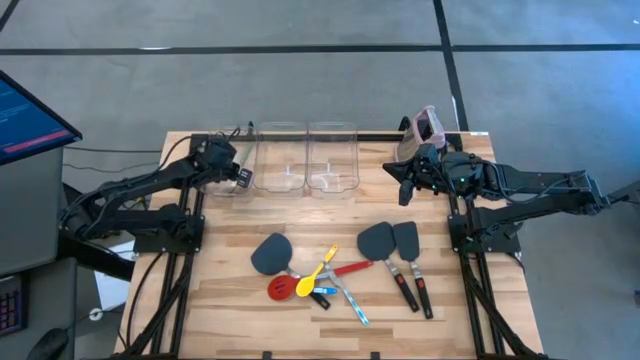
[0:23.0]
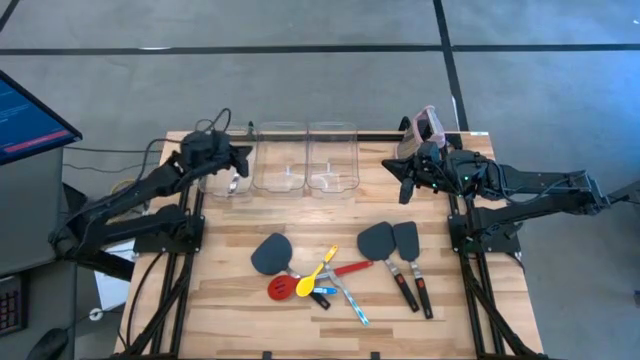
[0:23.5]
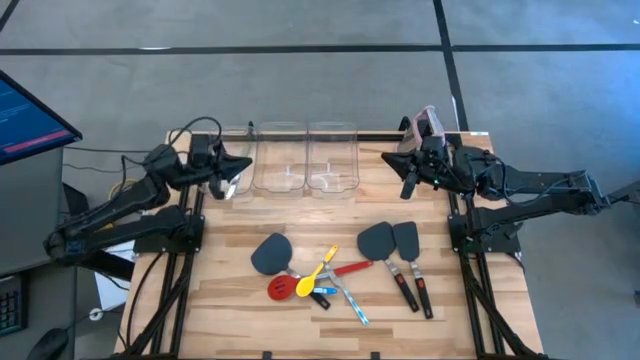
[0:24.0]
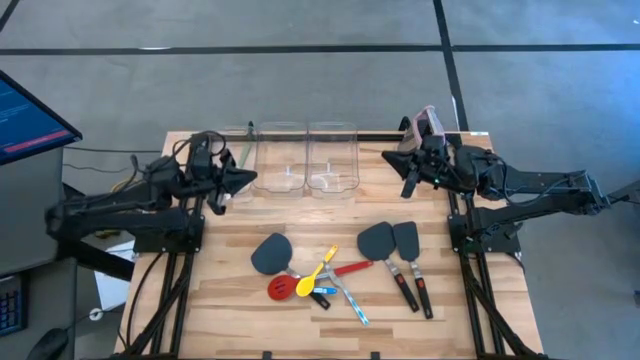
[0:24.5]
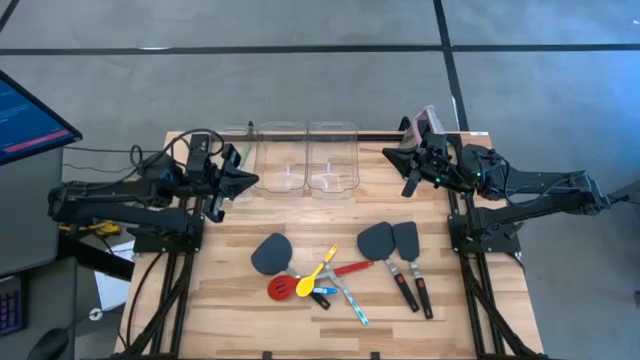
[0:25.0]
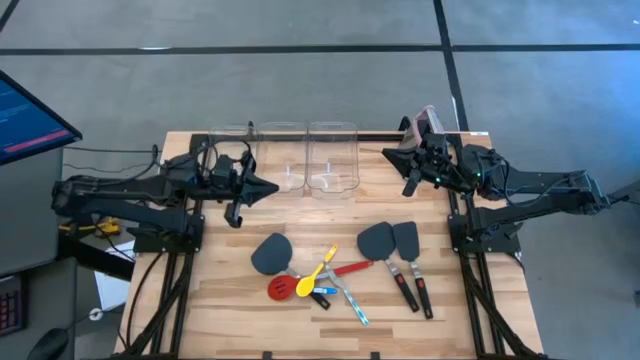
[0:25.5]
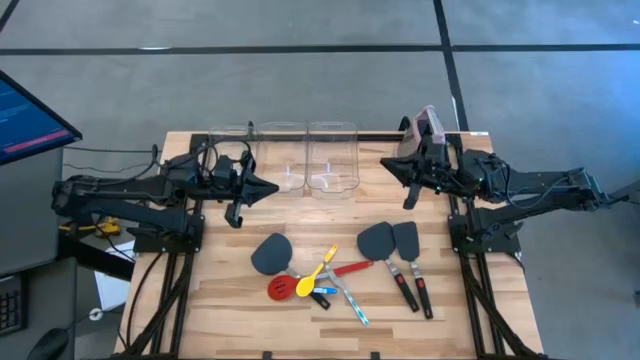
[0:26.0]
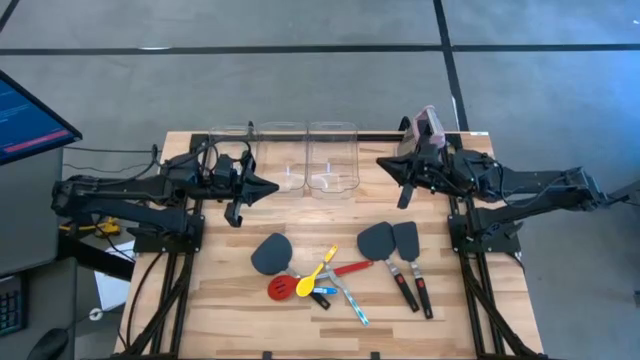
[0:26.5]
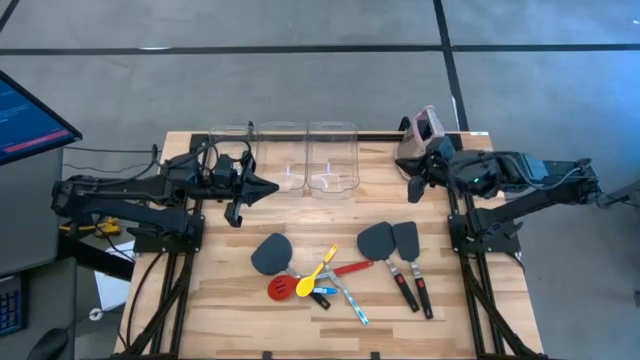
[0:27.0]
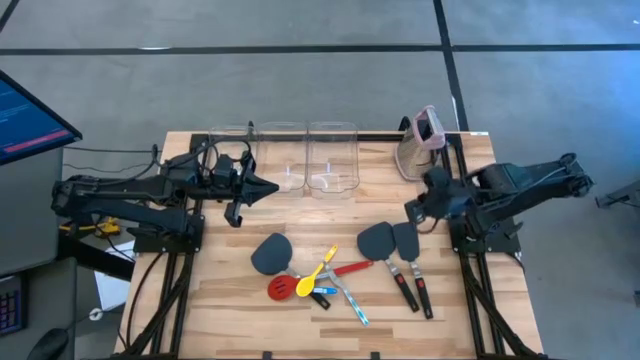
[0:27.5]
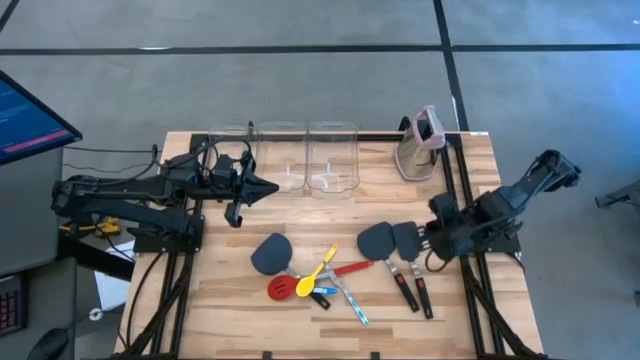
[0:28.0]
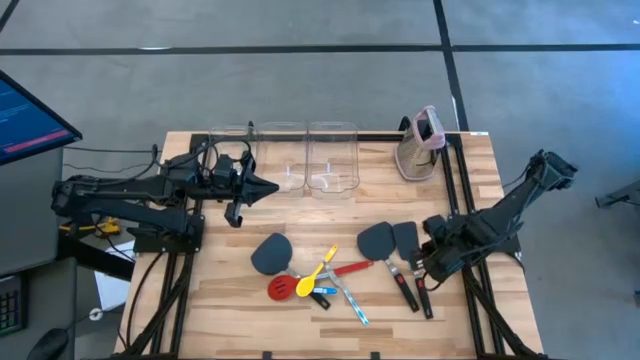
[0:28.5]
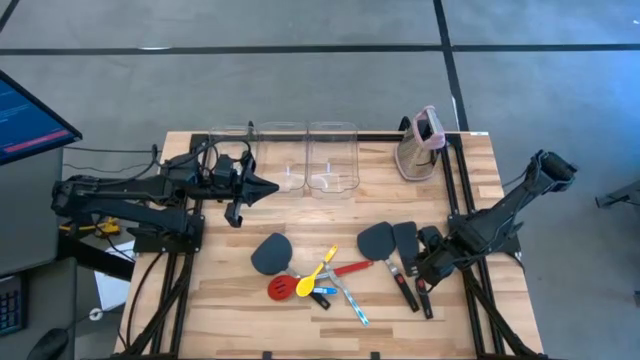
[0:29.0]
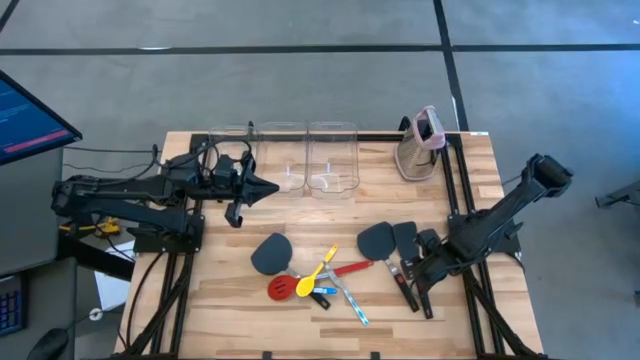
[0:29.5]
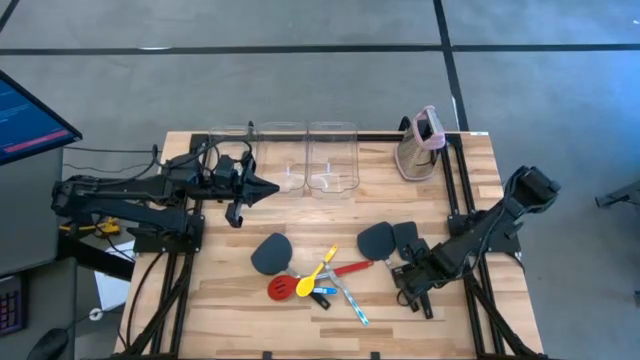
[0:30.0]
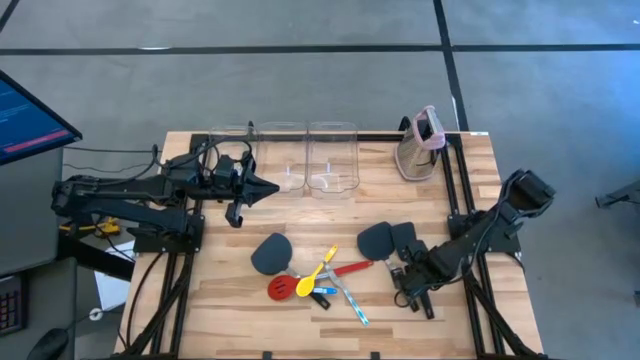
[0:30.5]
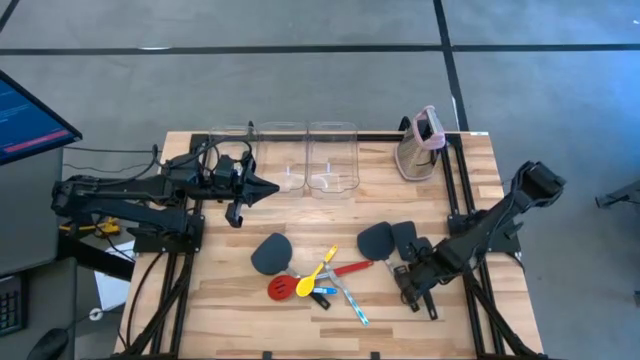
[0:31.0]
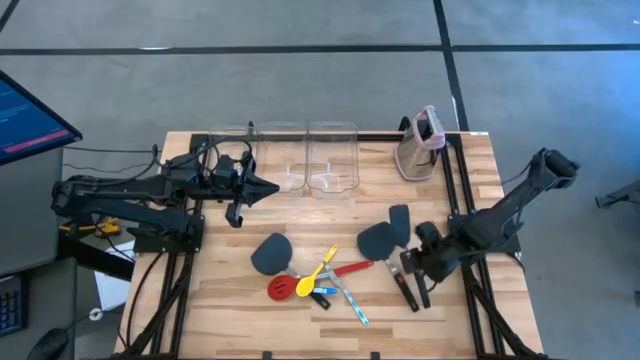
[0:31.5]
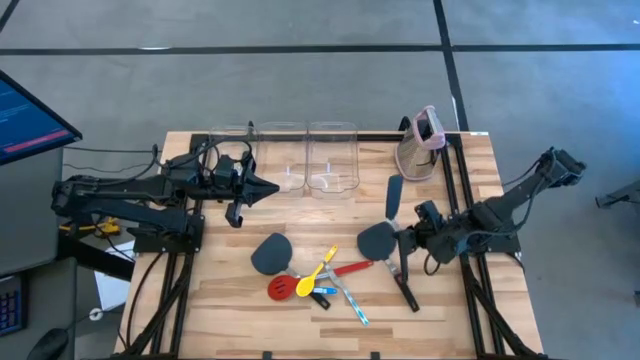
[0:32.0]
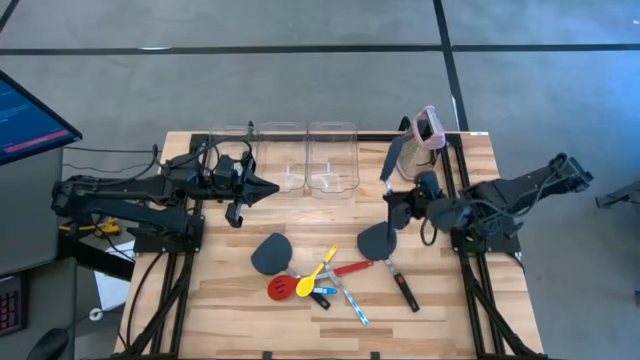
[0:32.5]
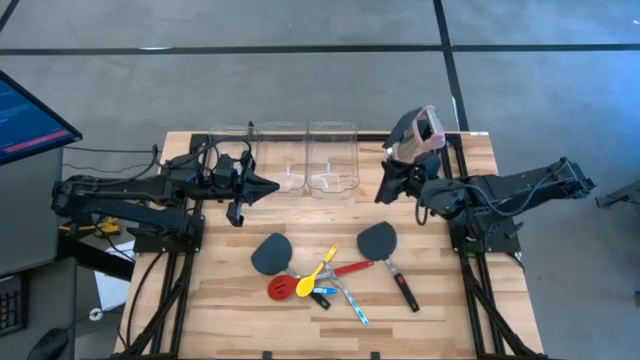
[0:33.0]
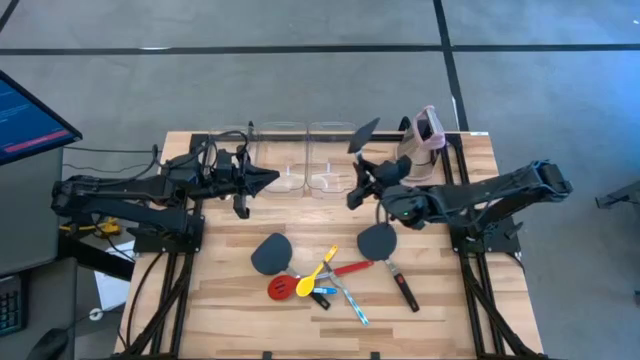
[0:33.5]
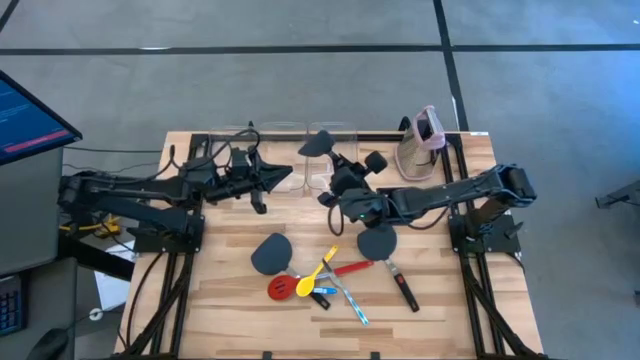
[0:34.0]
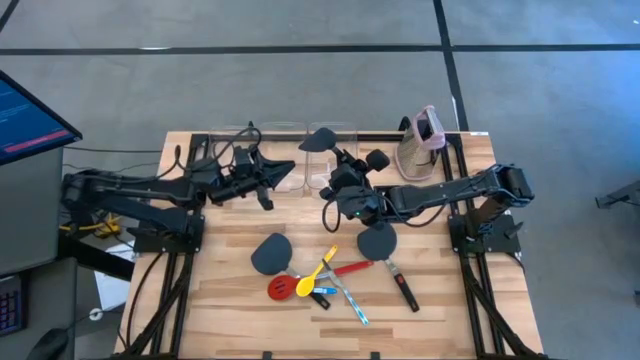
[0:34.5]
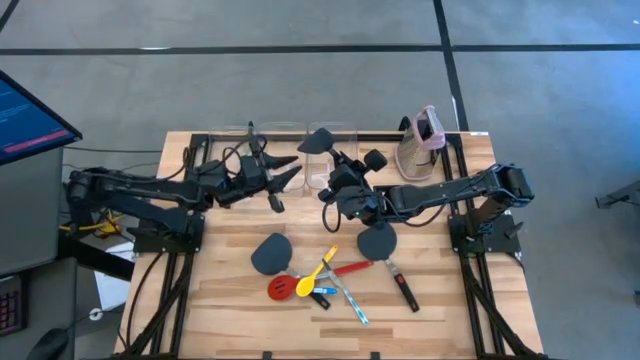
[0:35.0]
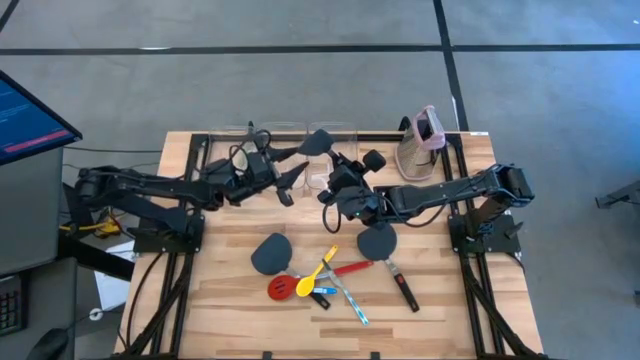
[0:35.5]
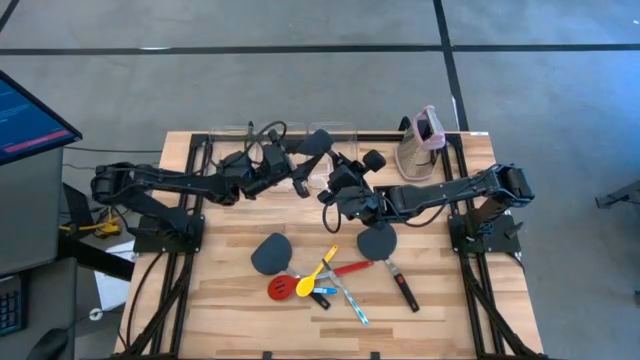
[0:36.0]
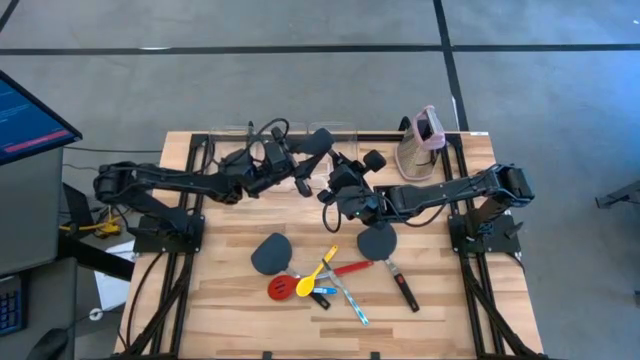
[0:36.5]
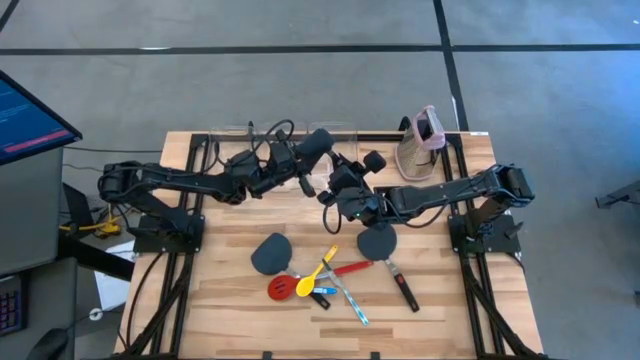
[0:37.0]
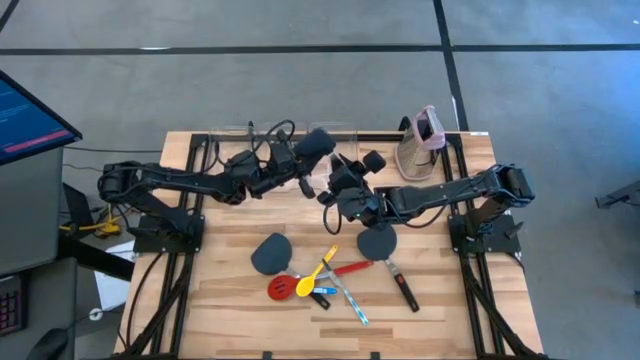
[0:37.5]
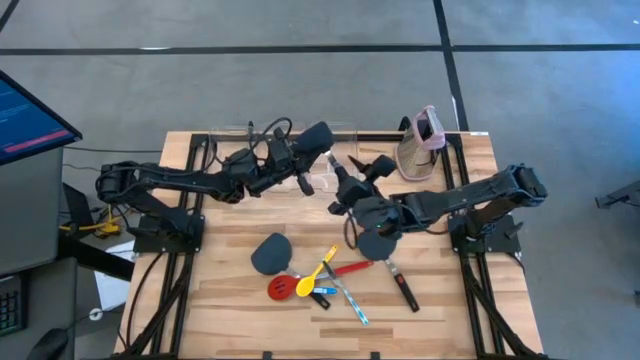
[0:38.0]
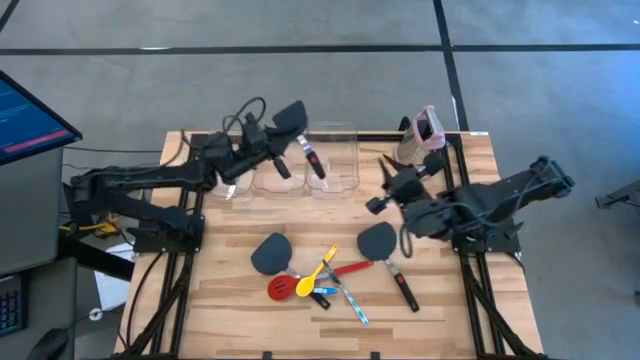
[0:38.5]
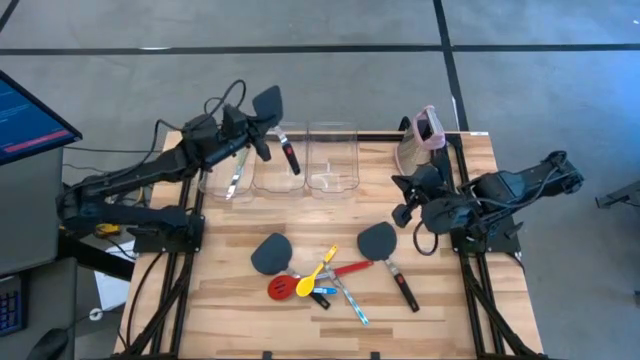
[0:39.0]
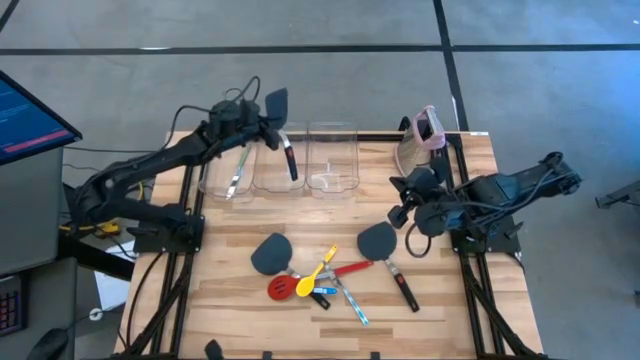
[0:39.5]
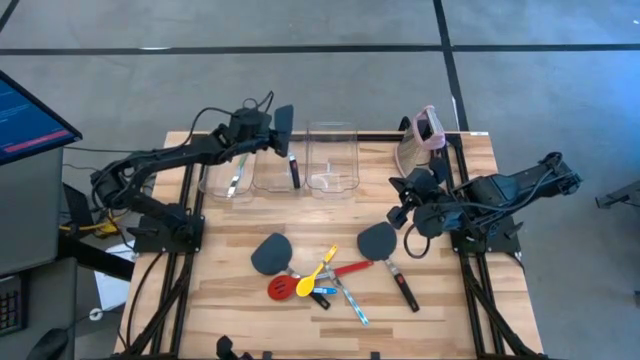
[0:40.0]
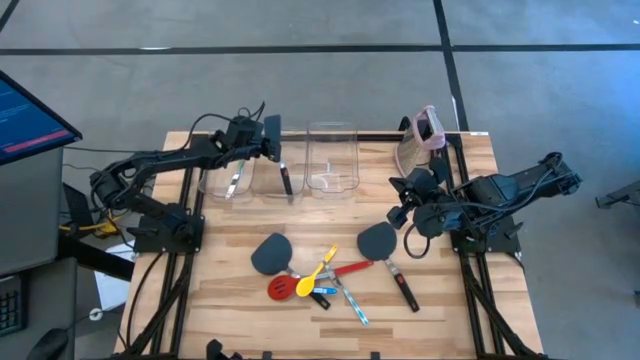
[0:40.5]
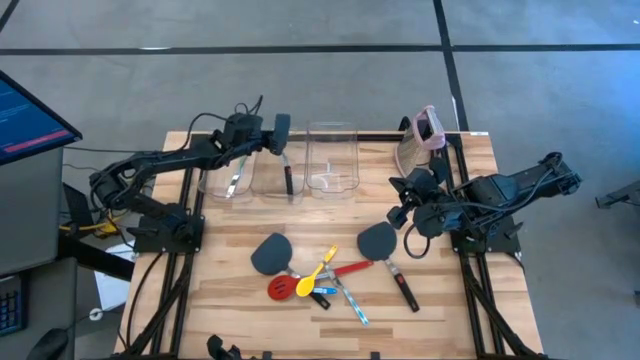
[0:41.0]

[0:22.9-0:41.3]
Task: Pick & Place Kitchen Items
Put the black spatula into the middle transparent bin

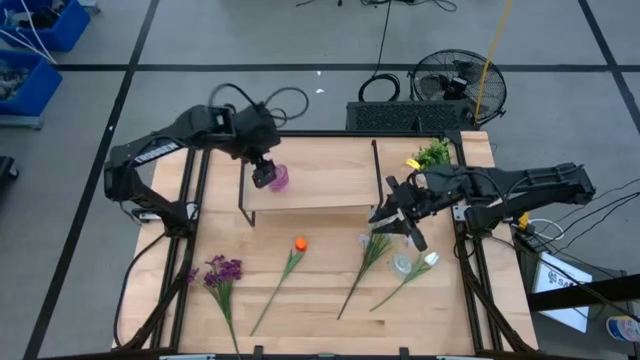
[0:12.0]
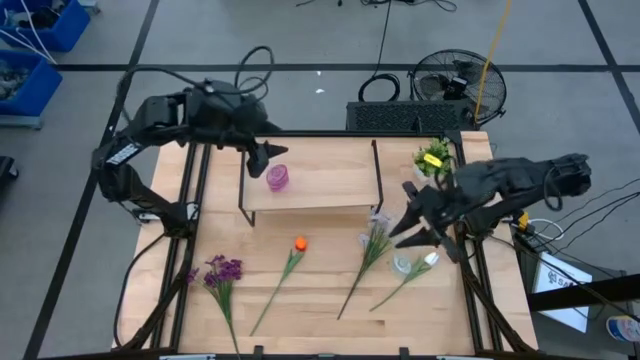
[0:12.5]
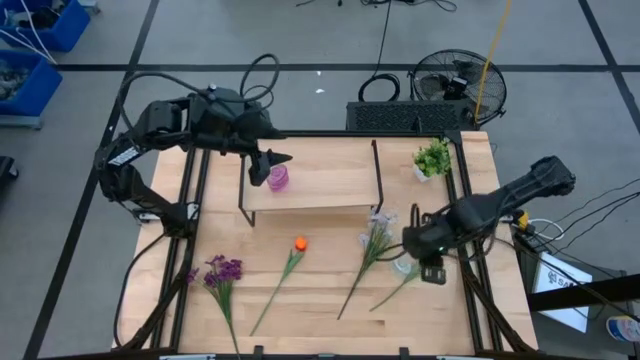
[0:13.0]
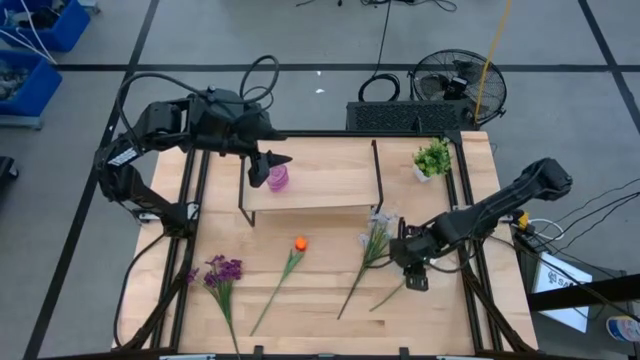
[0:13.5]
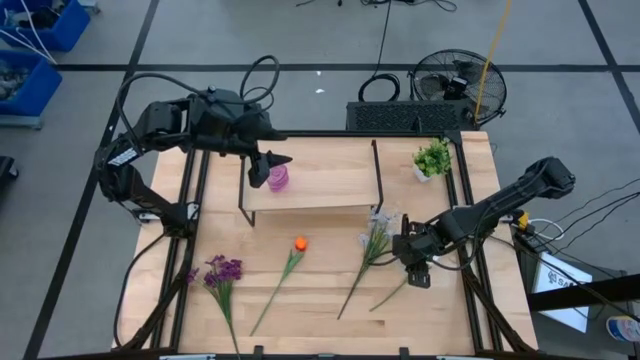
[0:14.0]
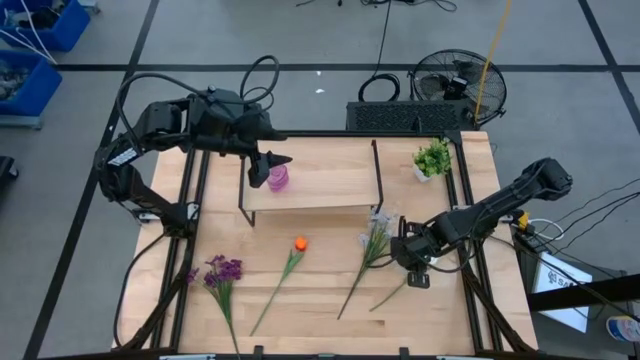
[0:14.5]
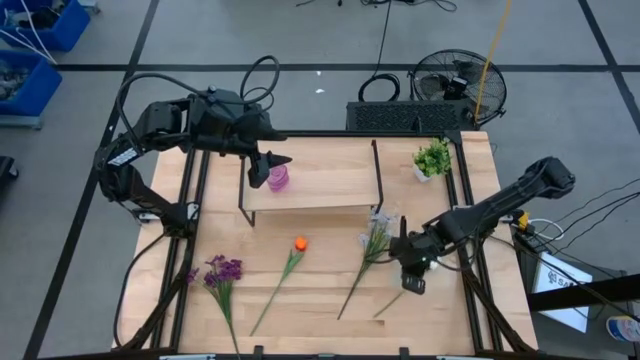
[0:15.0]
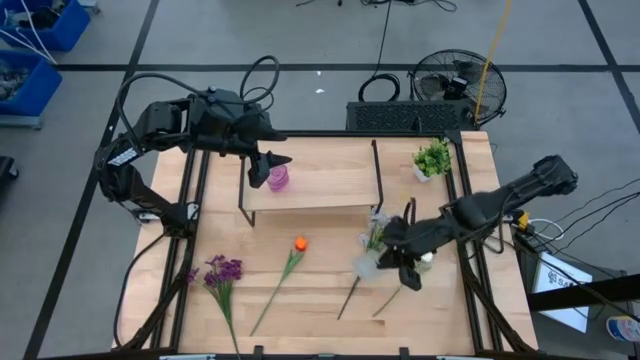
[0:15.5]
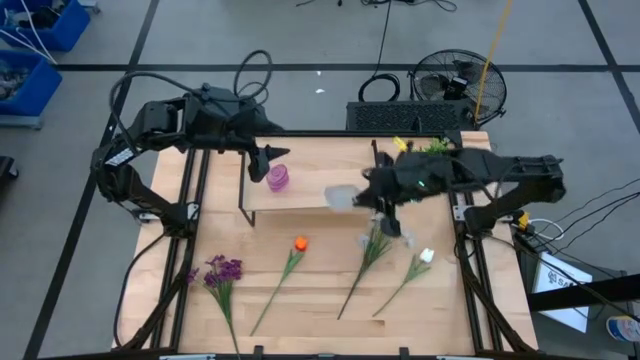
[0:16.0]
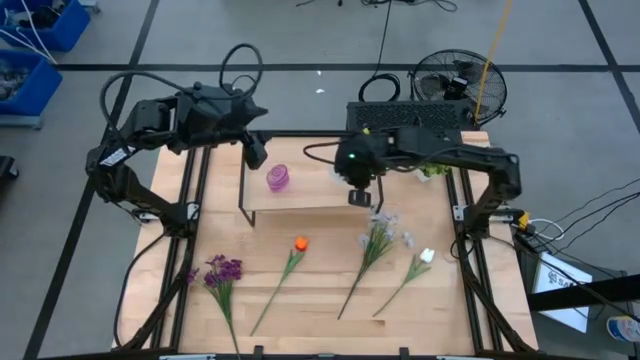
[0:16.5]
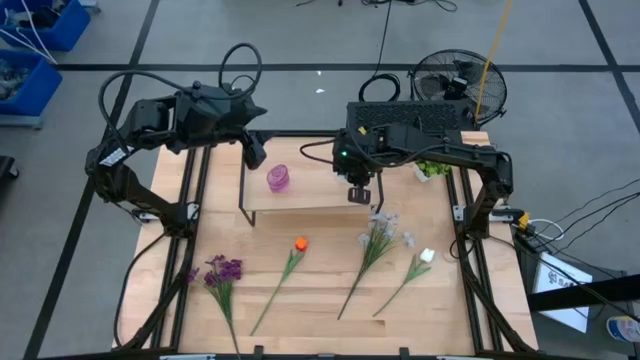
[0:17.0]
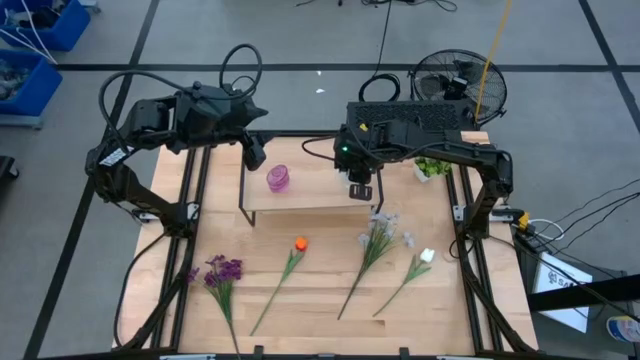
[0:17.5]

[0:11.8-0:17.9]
Task: Pick and place flowers into a vace then onto a shelf
Put the transparent vase on the shelf
